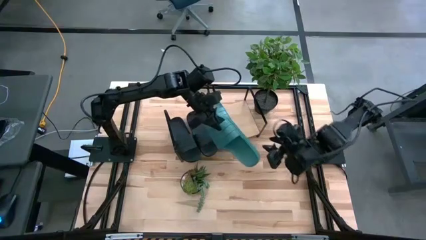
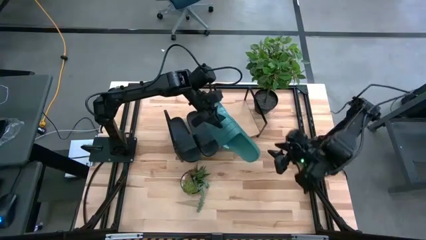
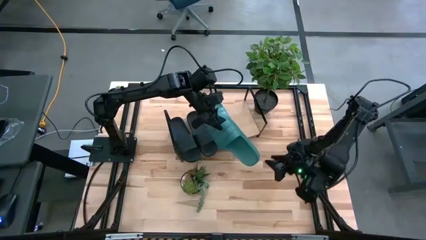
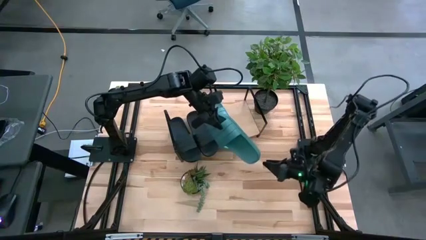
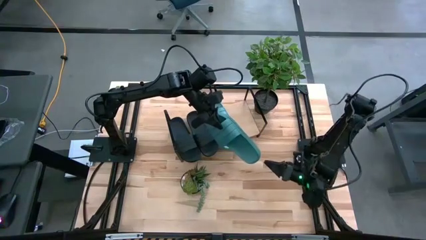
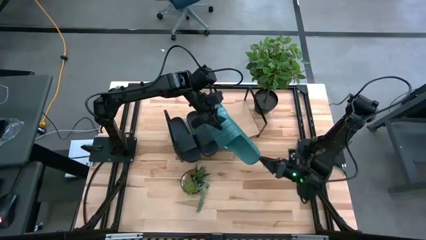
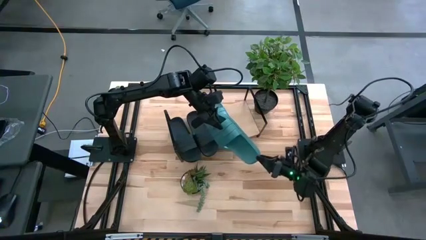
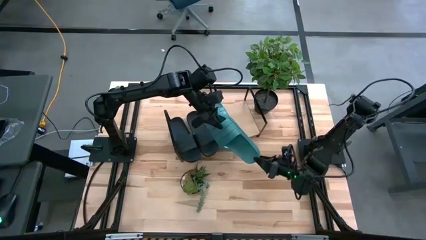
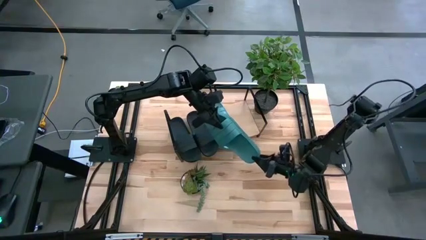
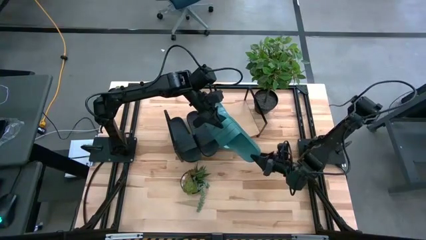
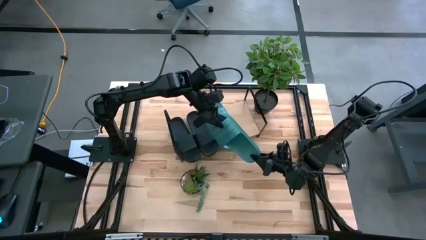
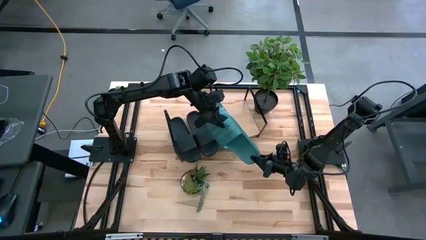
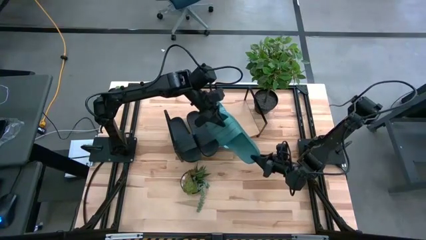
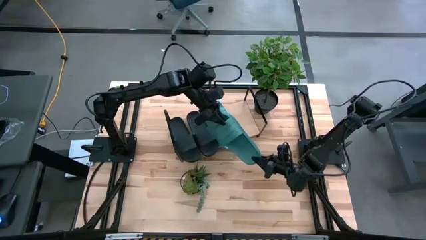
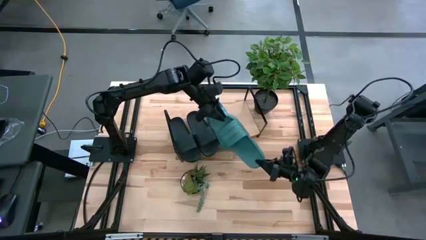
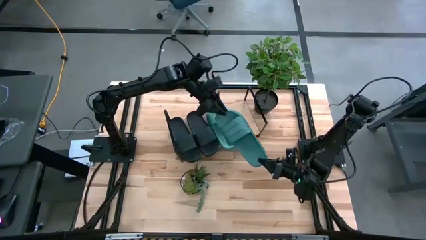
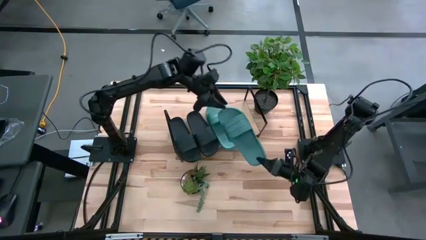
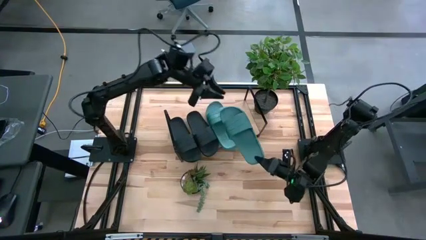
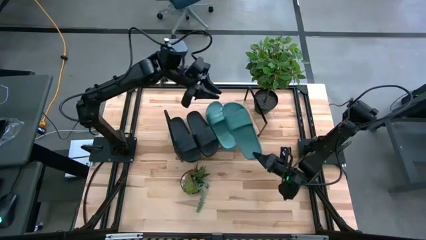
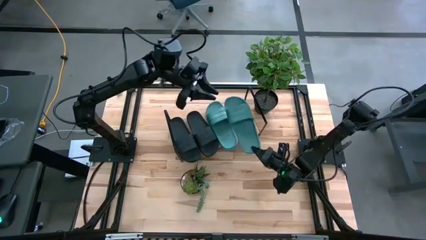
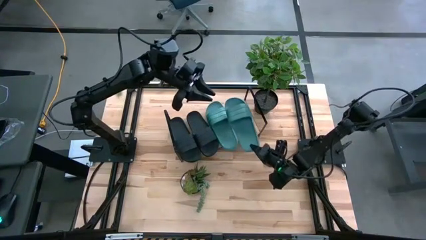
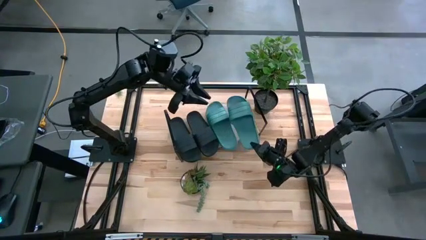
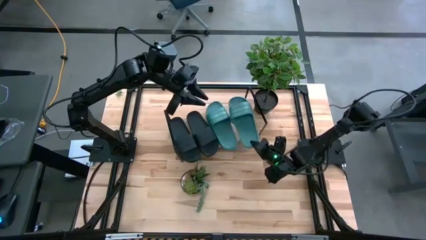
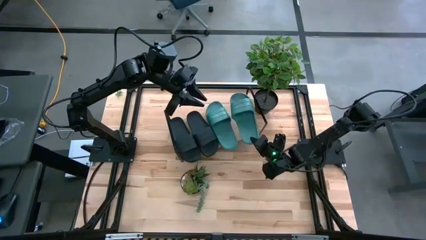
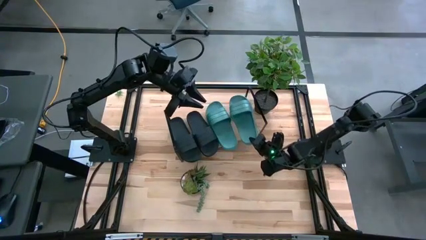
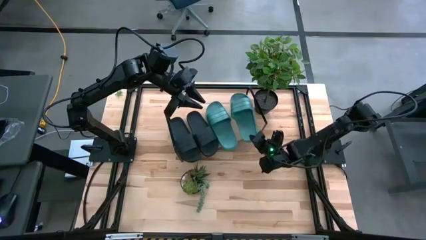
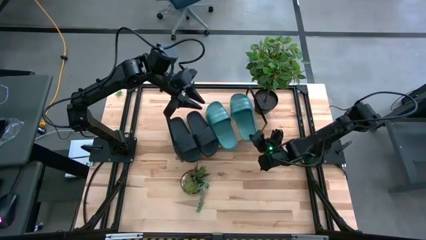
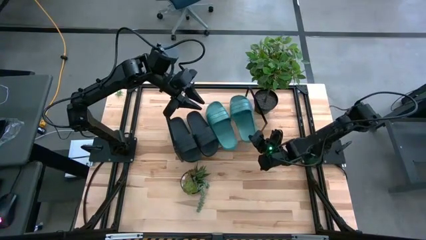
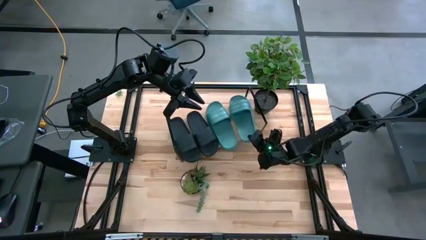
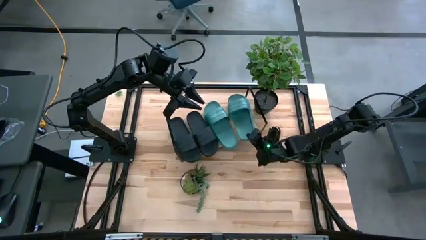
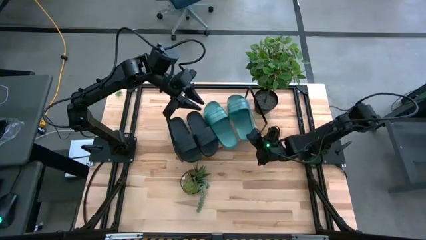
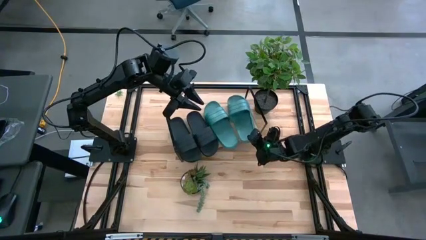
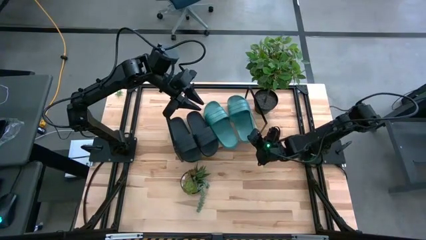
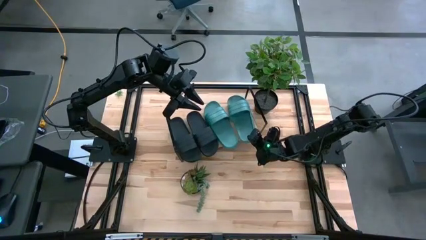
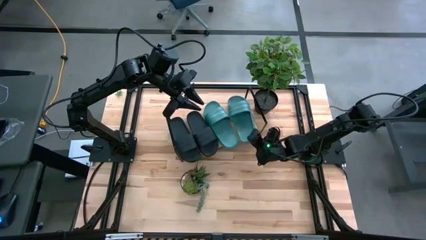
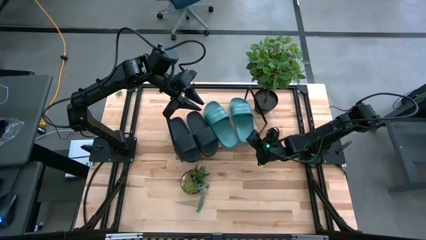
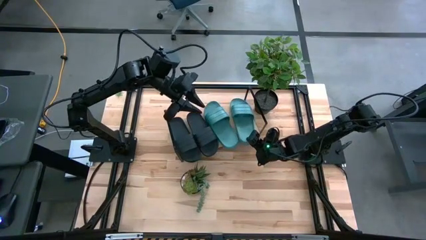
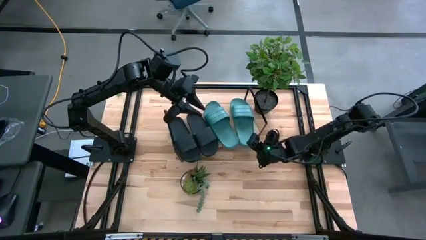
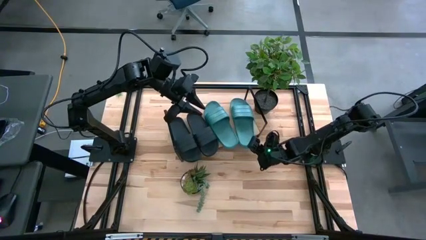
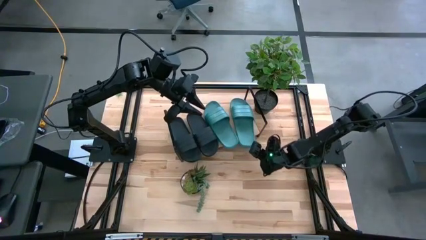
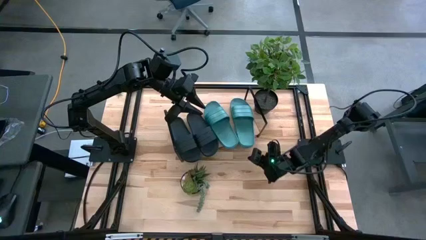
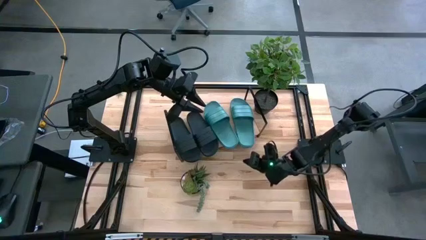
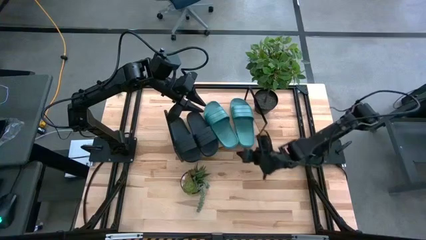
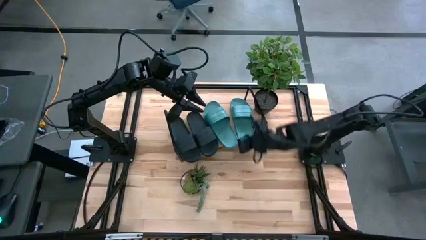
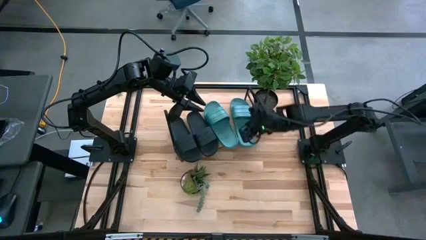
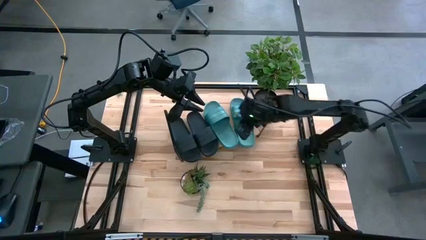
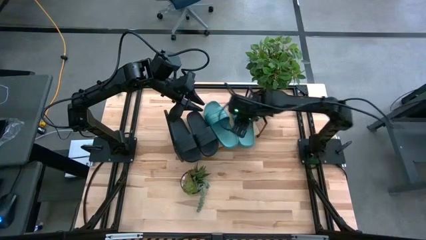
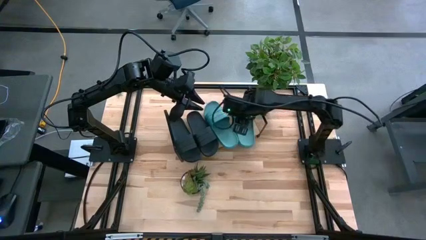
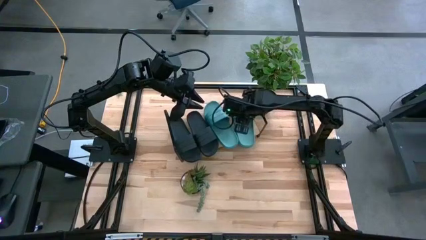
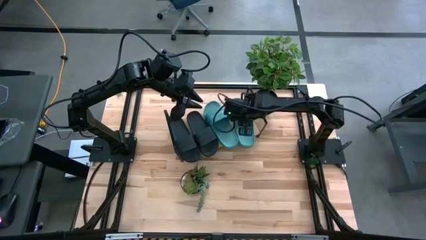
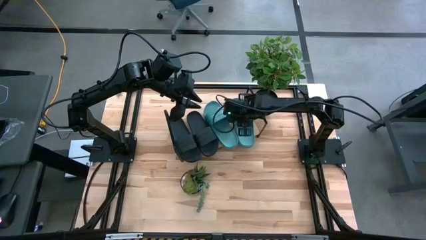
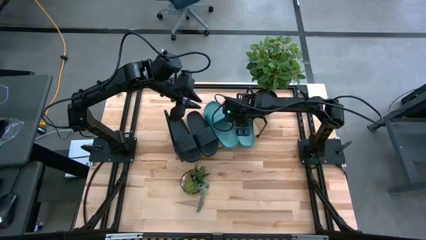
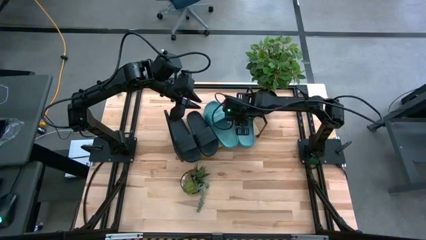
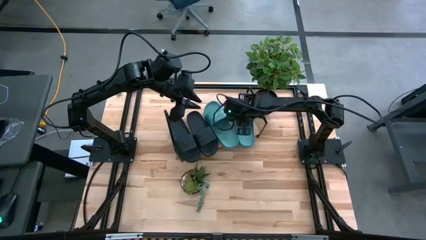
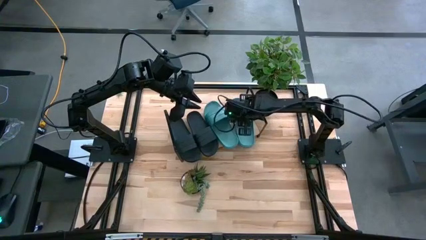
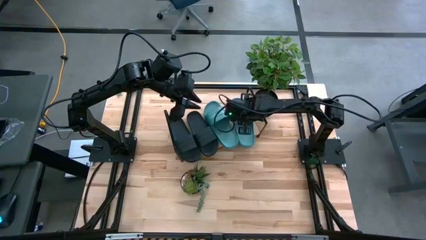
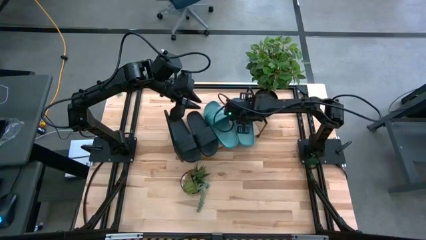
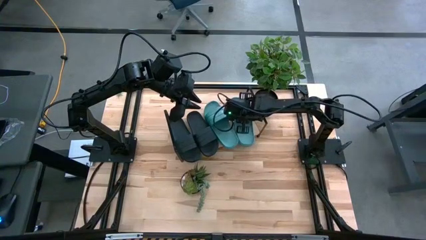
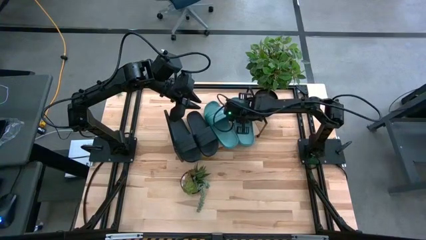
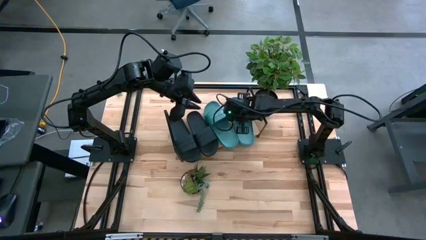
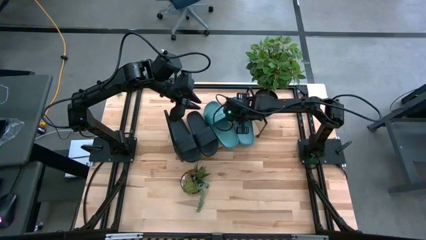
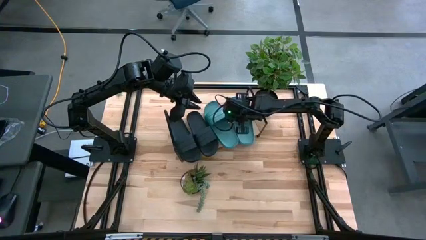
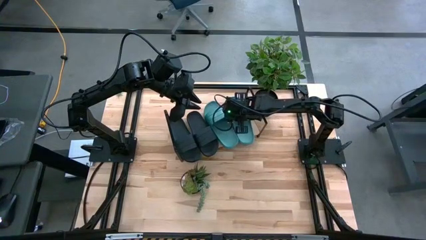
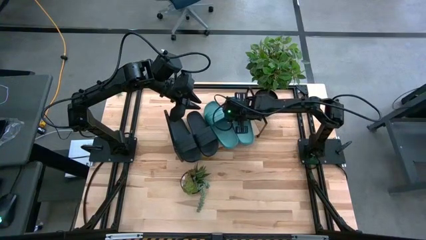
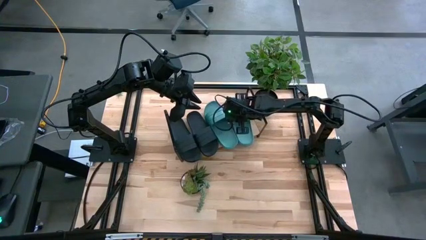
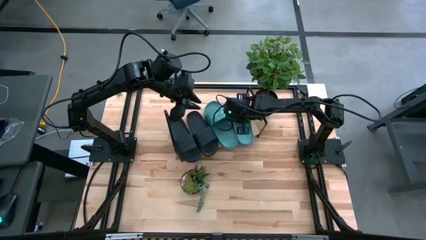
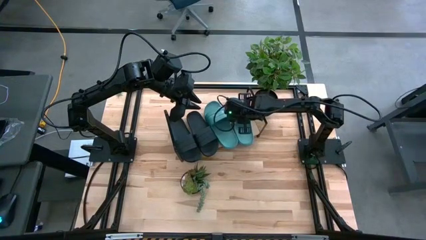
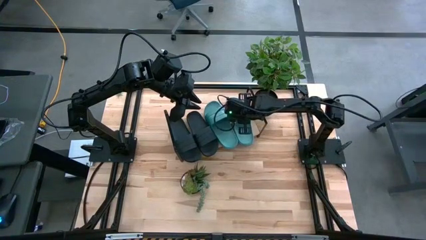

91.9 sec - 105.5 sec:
Task: Pick and place slides into the shelf
Put the blue slipper on the shelf

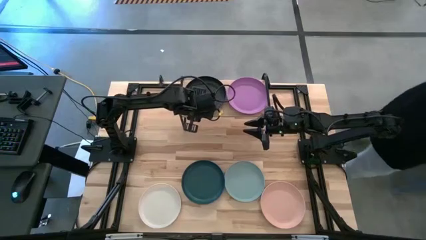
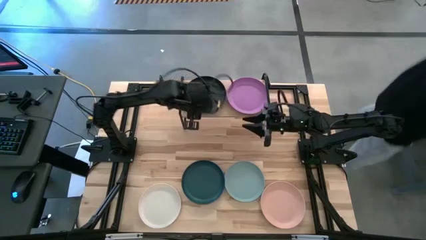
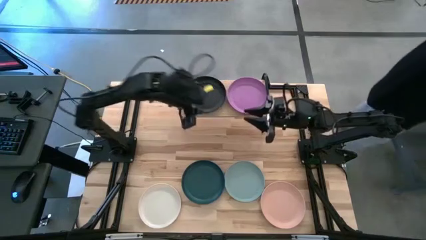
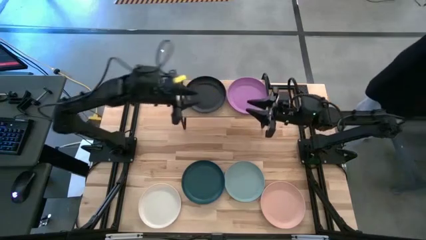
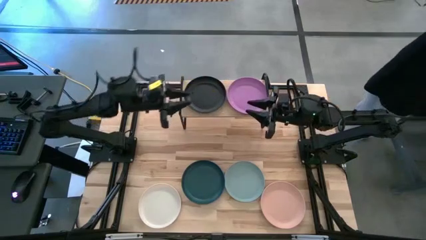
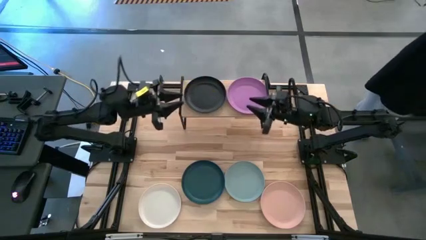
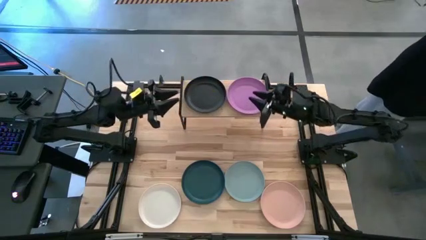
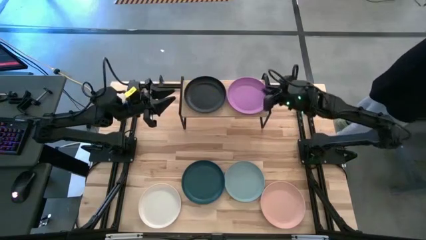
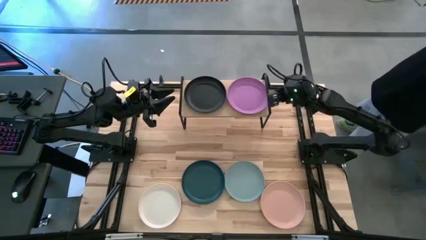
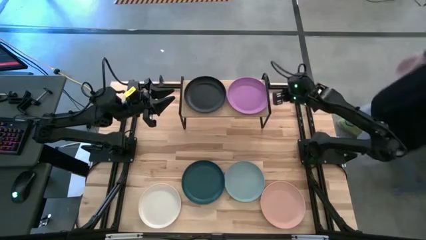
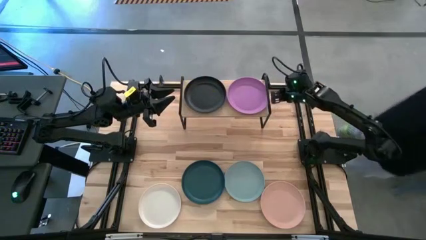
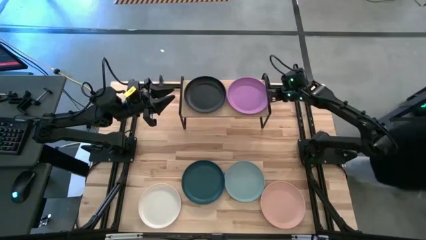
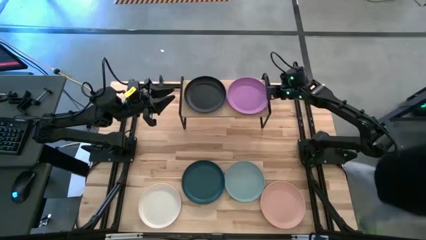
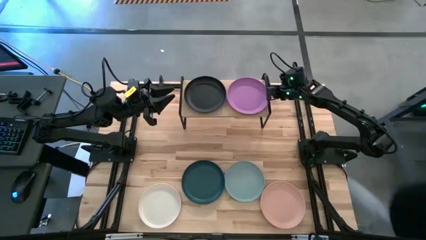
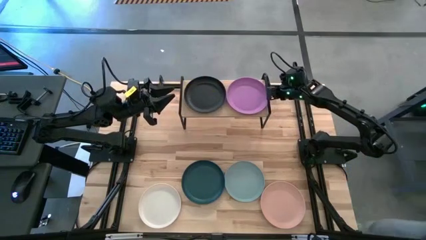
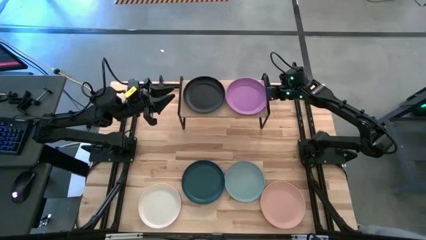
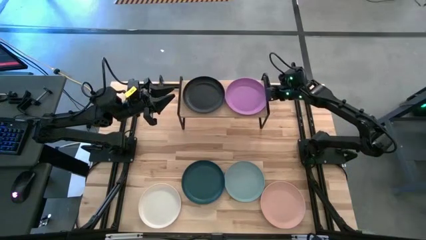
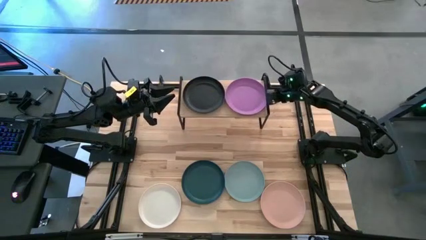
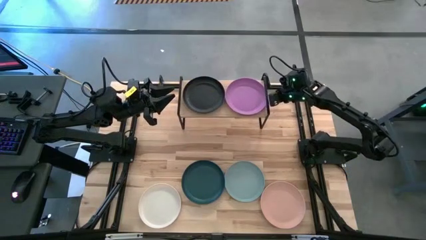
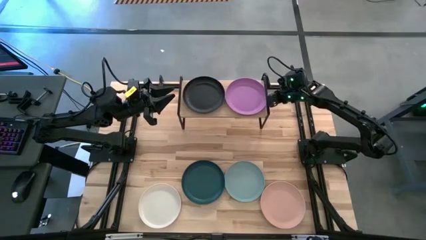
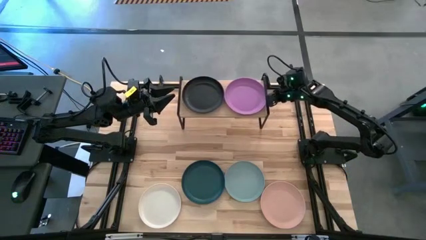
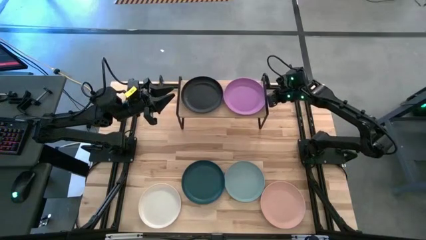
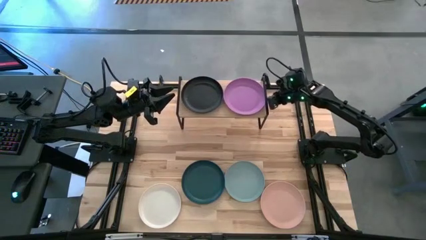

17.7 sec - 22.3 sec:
Task: Place and stack plates onto a shelf
Adjust the shelf
